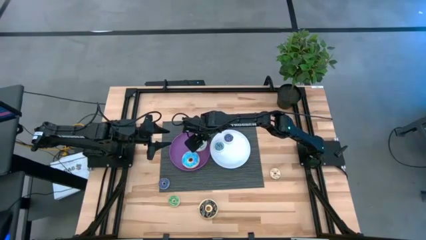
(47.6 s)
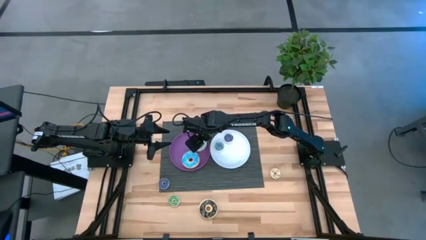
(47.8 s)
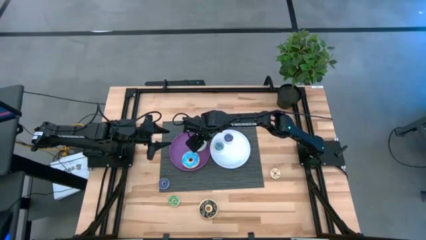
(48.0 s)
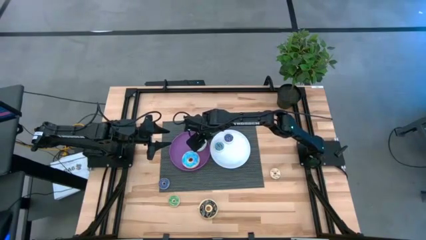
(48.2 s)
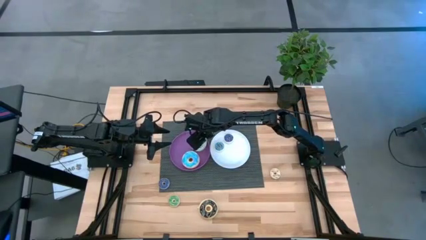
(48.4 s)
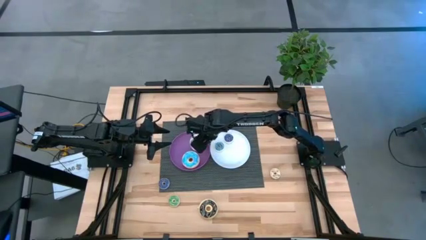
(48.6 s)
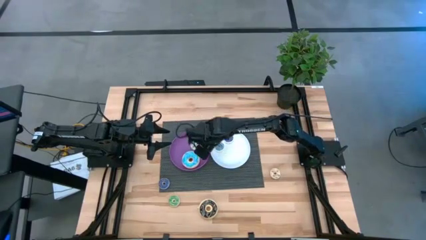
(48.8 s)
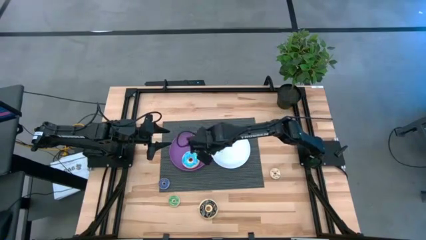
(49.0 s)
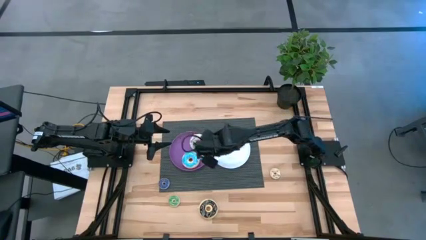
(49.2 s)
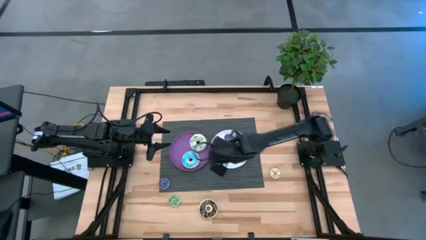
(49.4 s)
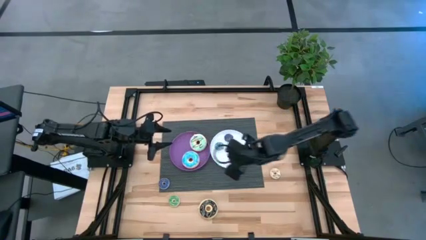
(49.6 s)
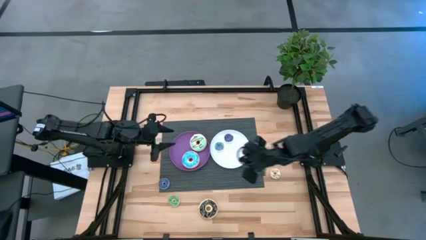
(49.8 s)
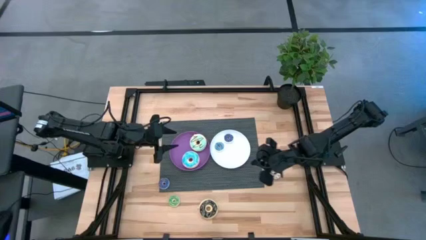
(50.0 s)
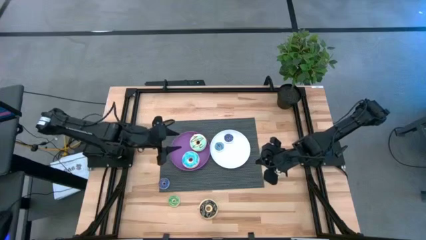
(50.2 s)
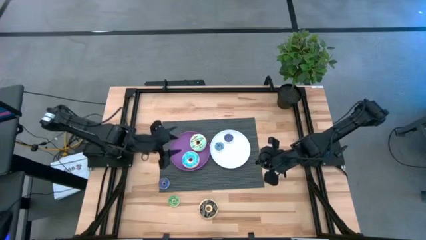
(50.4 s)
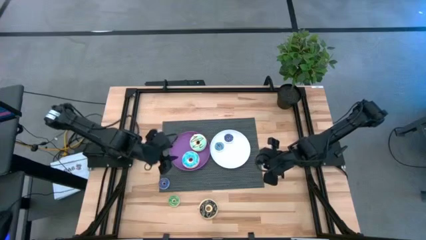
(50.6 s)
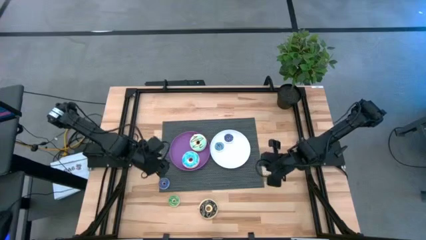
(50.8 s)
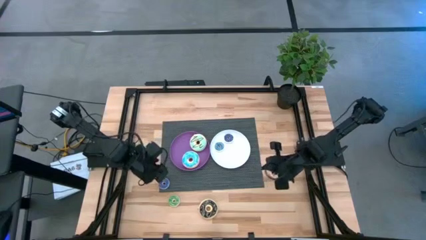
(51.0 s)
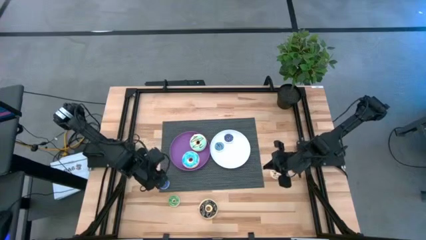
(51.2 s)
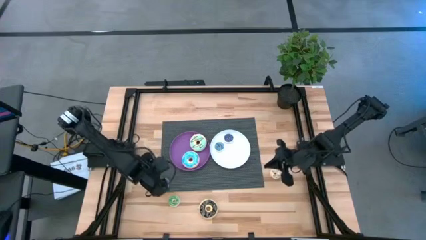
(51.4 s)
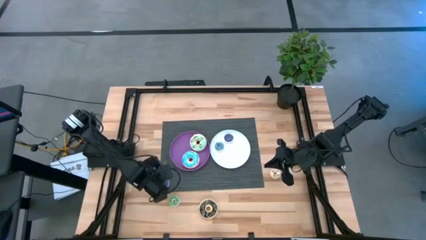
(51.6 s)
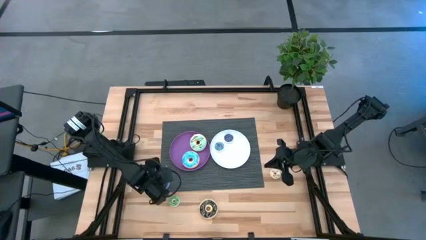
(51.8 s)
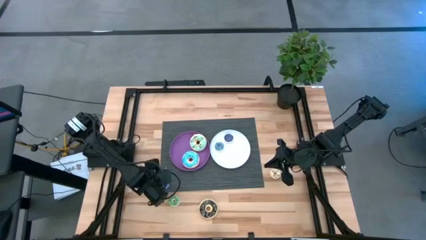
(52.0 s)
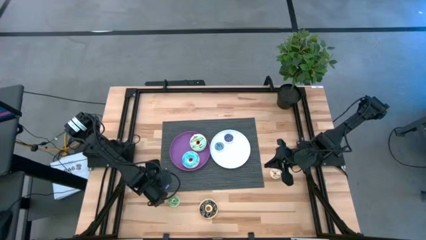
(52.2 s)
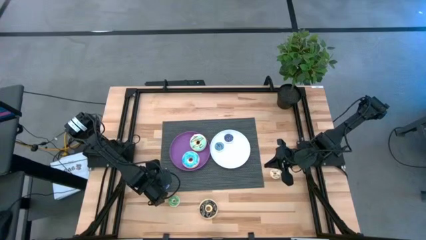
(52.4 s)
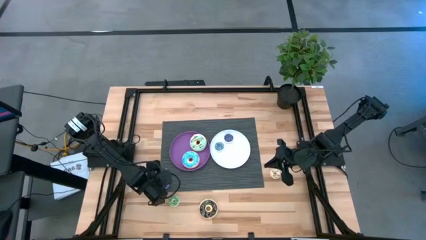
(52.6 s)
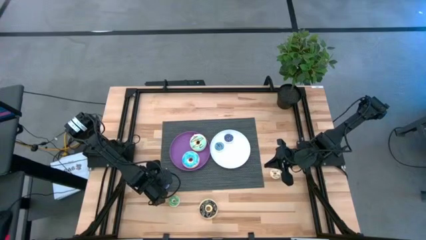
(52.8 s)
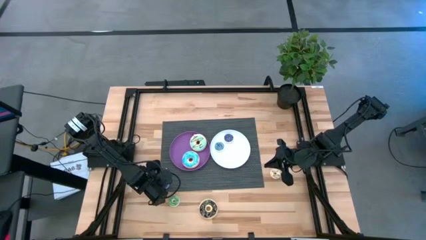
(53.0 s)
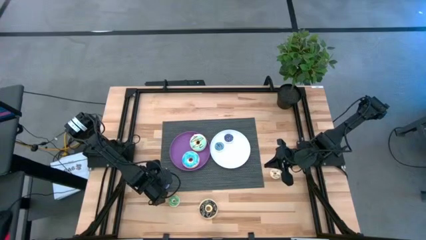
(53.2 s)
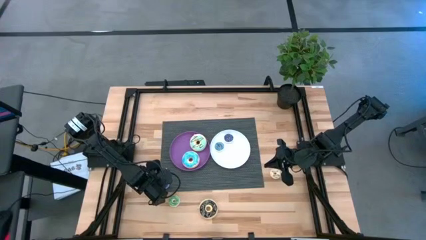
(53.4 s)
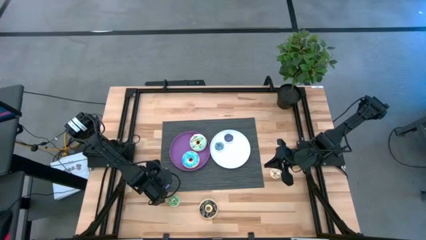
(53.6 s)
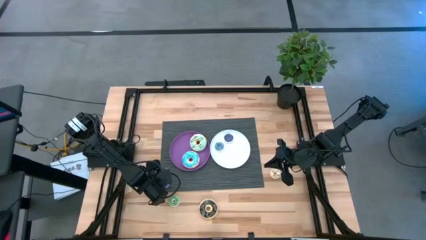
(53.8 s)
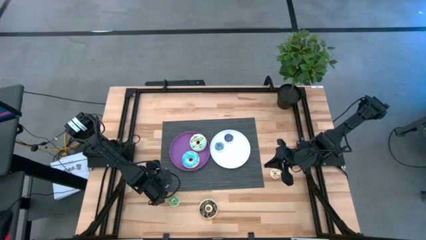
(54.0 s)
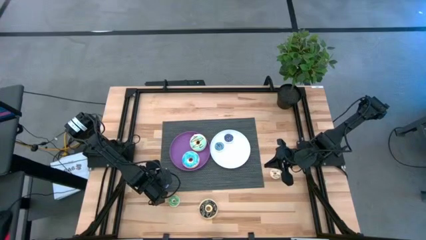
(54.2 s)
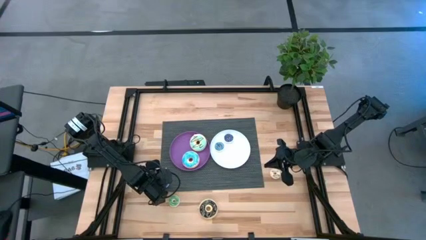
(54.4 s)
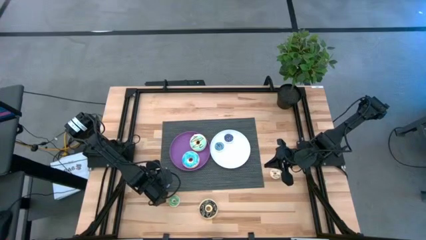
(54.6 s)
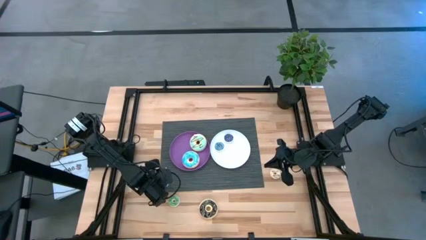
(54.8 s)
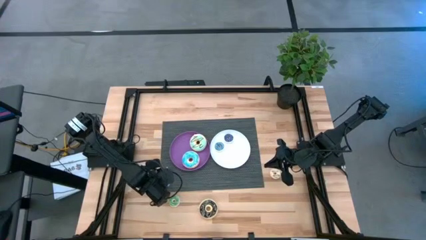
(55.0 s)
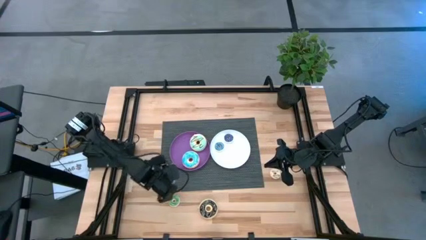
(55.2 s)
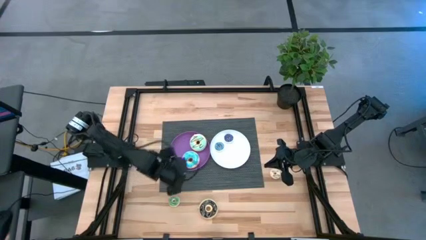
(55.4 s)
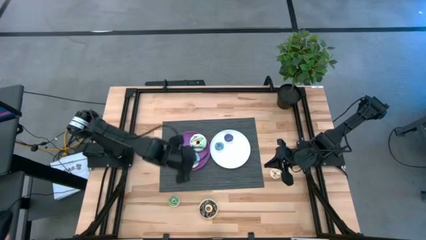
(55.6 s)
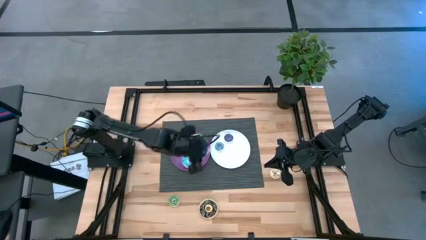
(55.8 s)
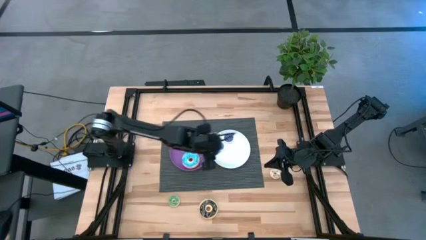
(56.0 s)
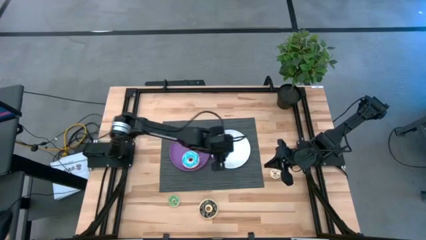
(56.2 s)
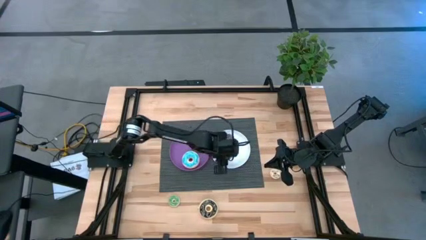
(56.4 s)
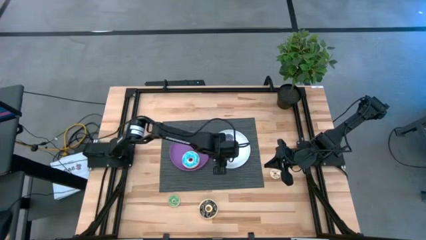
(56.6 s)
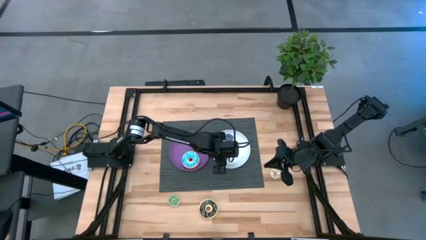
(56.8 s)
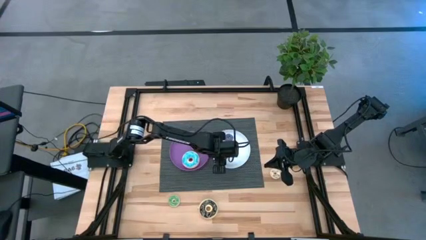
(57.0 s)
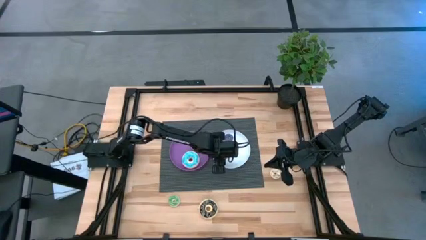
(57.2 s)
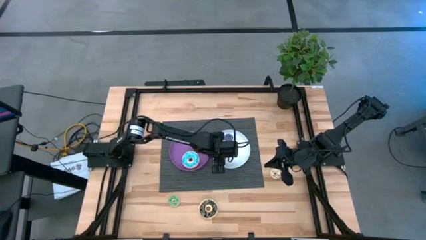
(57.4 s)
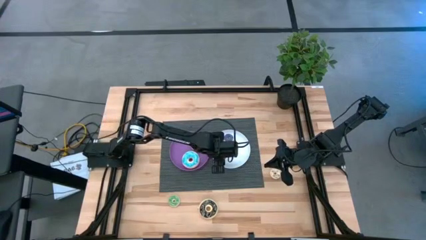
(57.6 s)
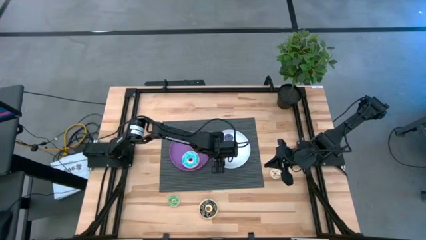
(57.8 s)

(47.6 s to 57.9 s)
Task: Pick & Place donuts
Put the small dark blue donut on the white plate
